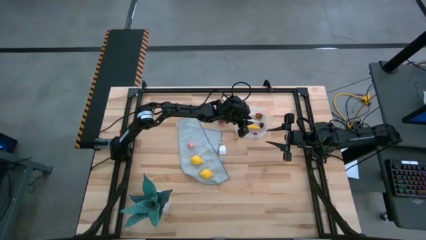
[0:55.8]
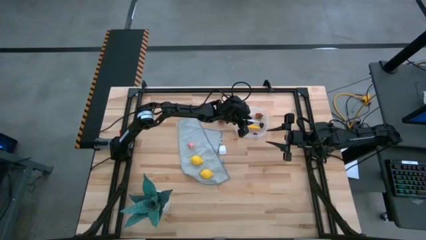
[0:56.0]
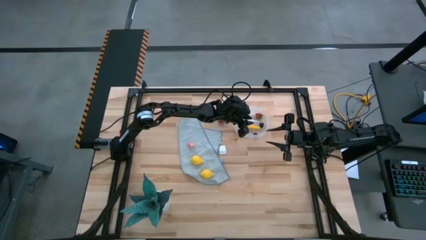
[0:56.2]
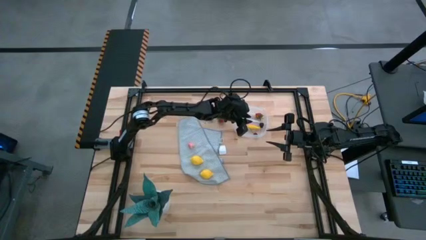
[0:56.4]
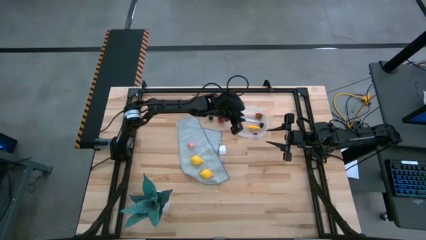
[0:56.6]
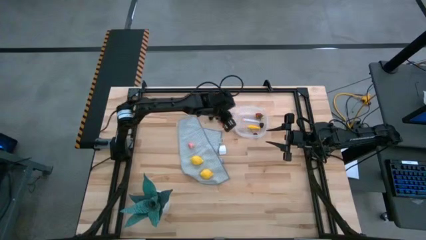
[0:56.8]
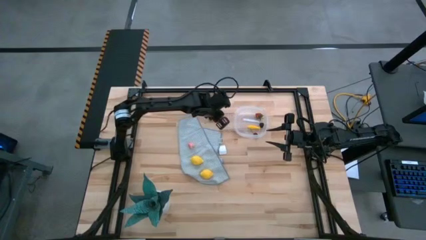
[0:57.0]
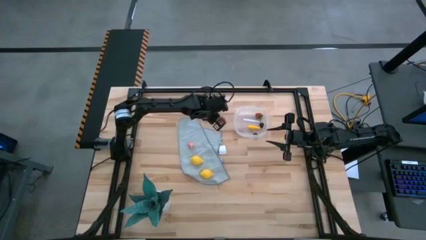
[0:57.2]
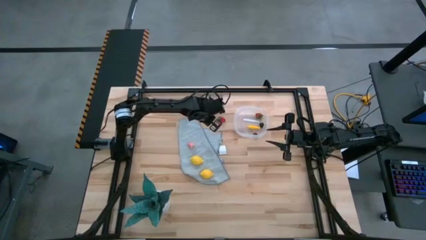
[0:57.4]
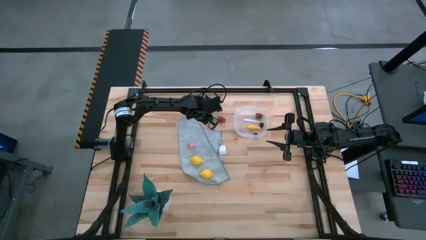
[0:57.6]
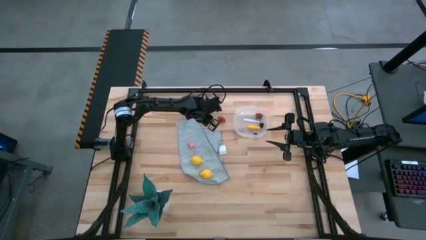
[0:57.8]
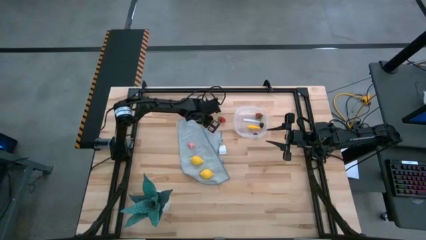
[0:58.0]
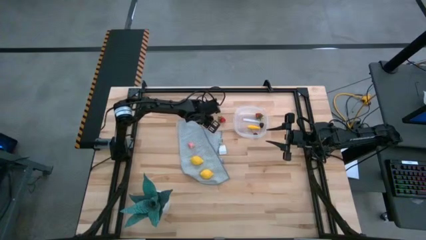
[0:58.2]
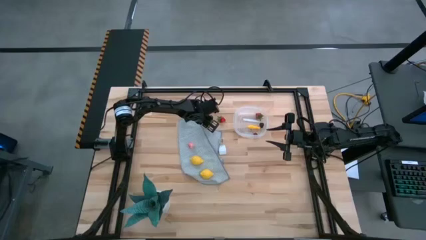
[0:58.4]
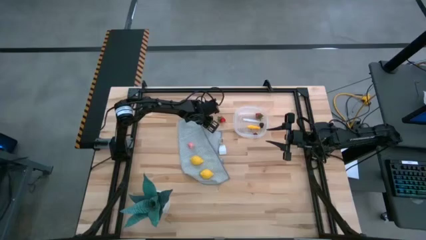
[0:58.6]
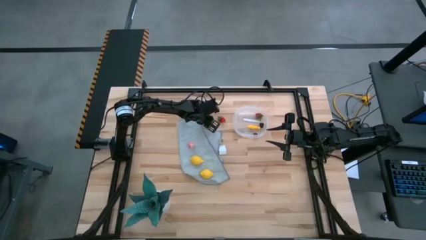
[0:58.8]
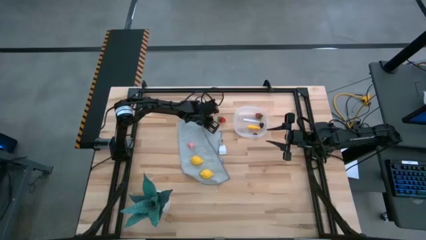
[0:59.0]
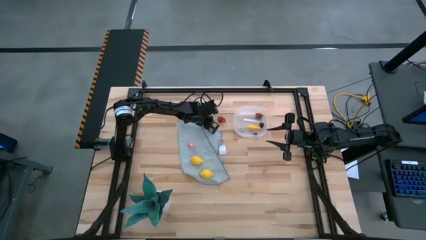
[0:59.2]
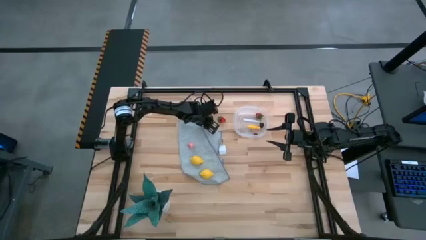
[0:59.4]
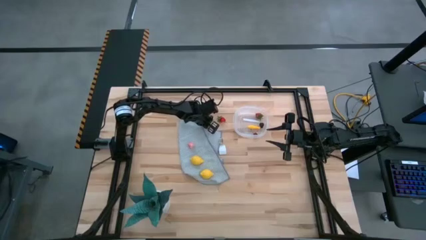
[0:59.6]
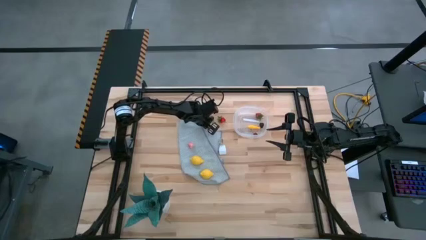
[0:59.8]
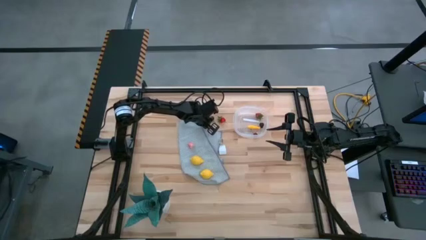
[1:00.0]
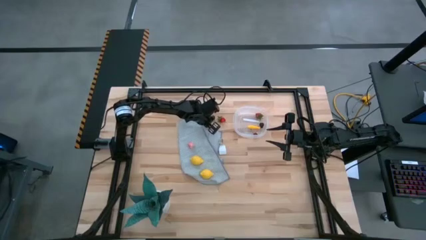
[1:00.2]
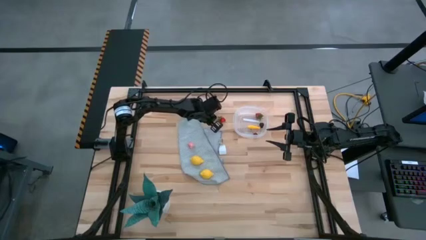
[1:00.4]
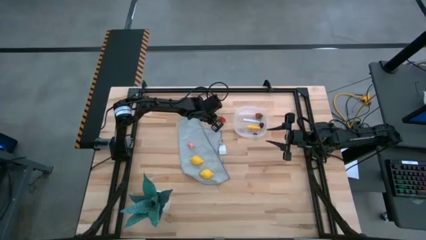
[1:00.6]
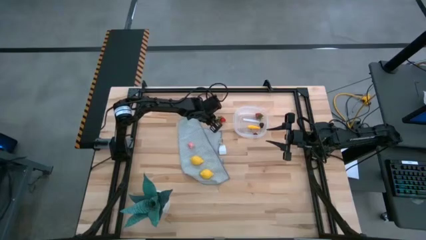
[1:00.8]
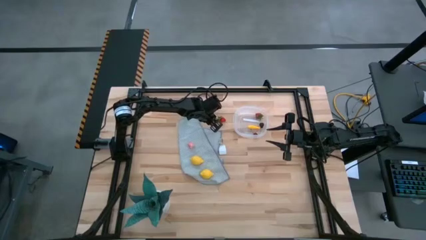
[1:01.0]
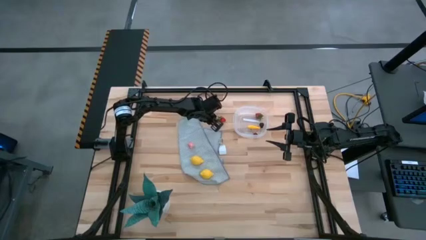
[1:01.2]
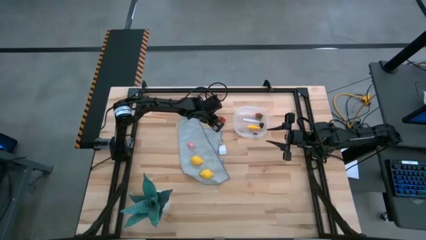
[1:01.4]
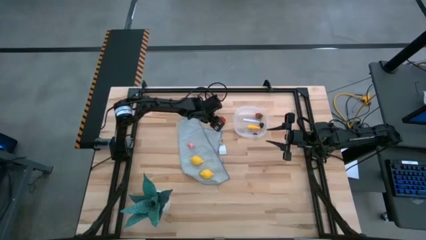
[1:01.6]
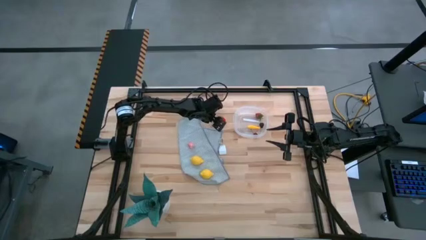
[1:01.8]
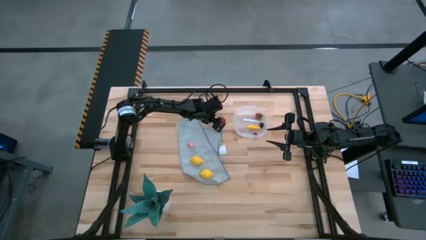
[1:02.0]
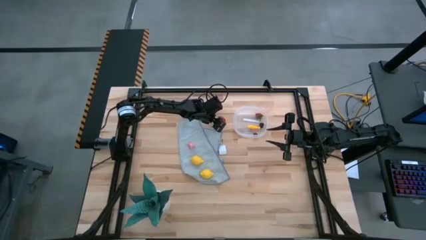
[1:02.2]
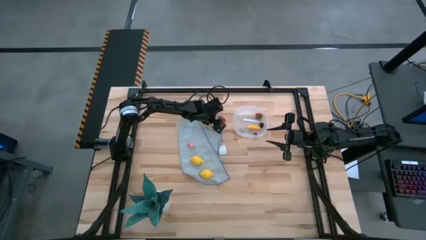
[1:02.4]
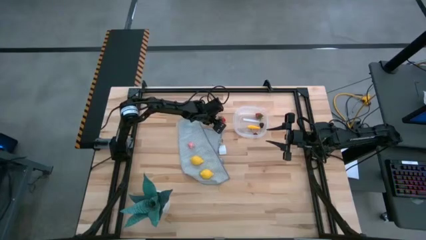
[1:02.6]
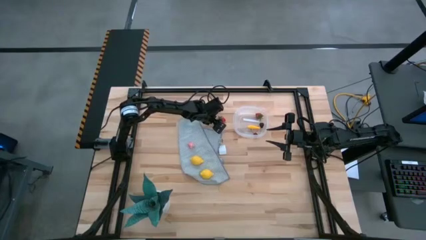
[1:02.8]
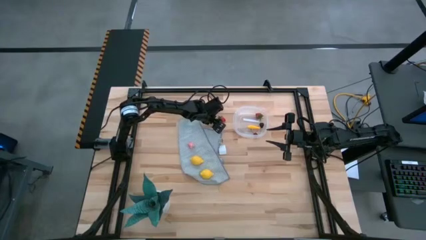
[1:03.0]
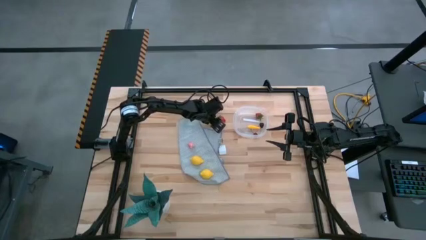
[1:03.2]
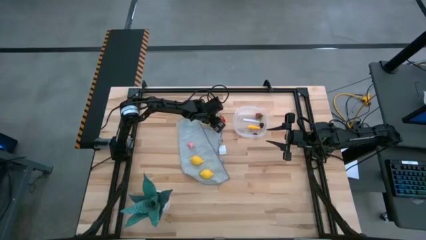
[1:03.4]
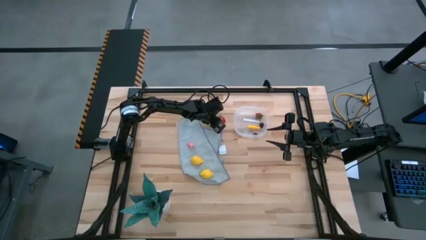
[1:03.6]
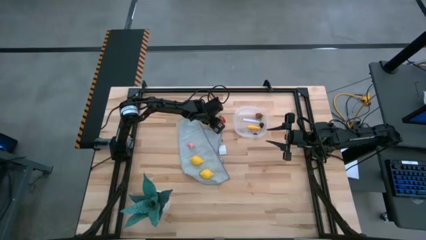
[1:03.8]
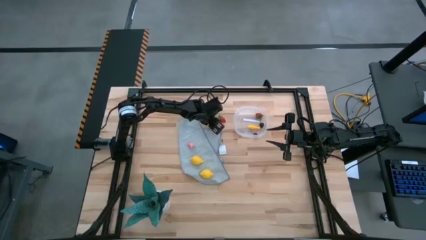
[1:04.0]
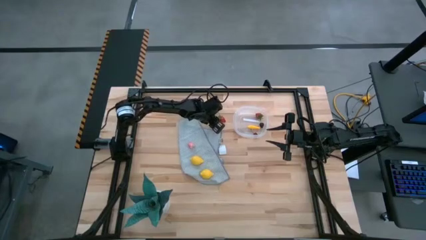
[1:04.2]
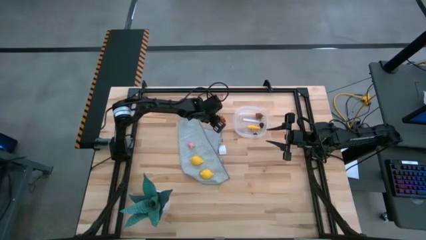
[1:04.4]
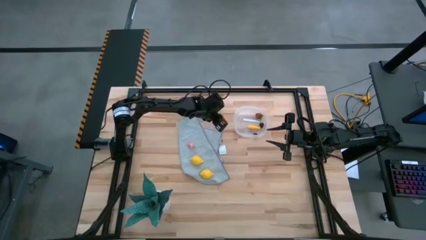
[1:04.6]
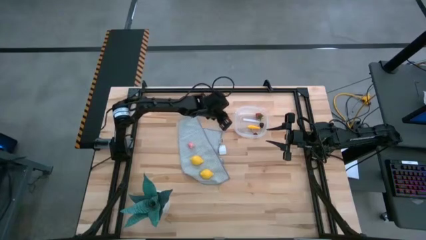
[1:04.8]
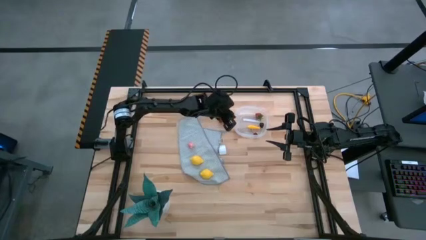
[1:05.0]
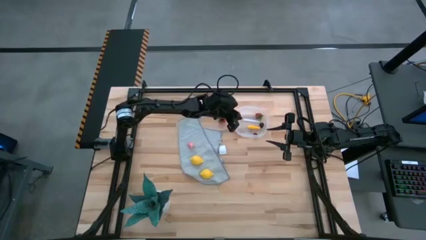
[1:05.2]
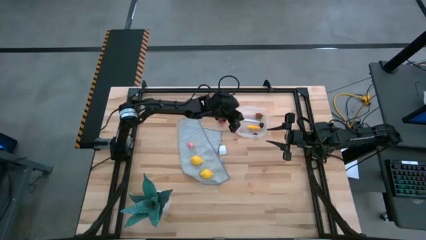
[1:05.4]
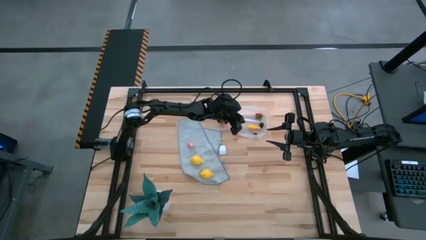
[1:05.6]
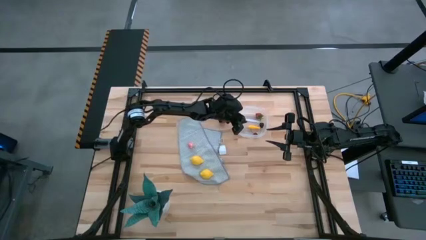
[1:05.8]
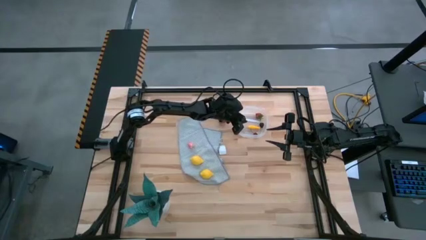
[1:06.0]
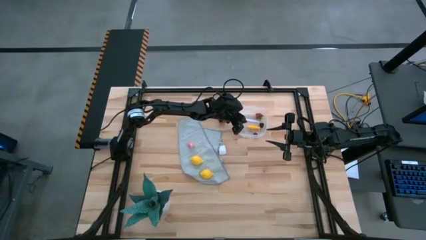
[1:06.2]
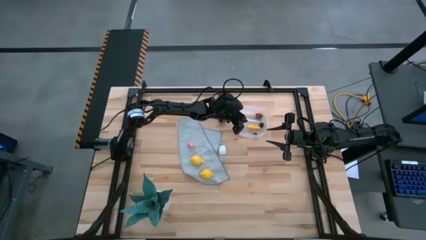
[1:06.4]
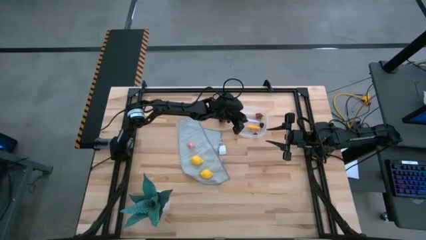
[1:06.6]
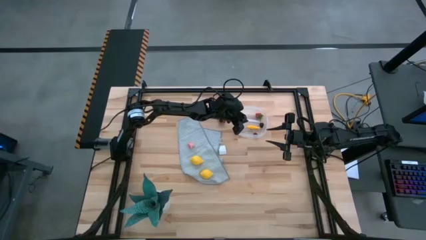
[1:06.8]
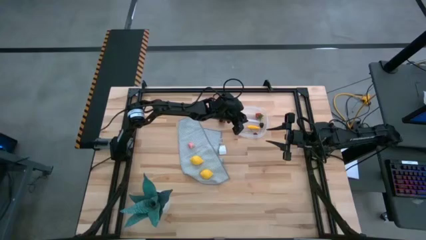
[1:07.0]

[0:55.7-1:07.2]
Task: Pick and placing Produce into tupperware
Put the black cherry into the transparent bin
